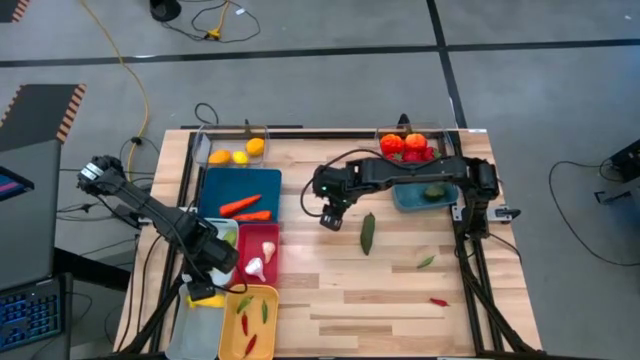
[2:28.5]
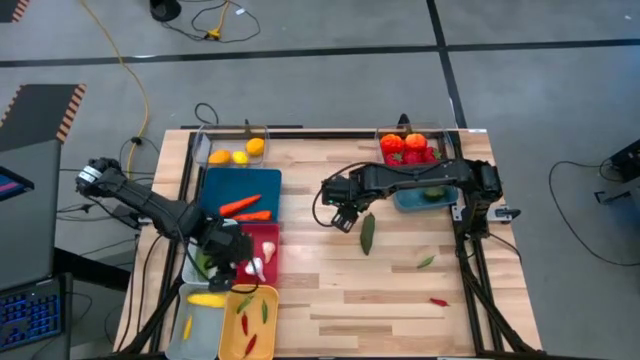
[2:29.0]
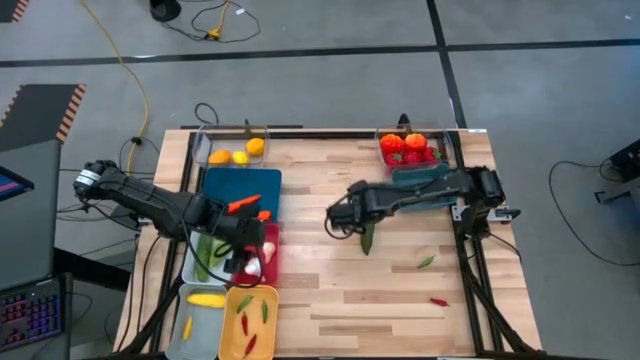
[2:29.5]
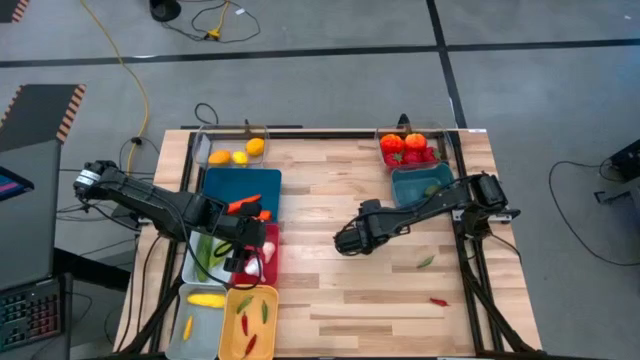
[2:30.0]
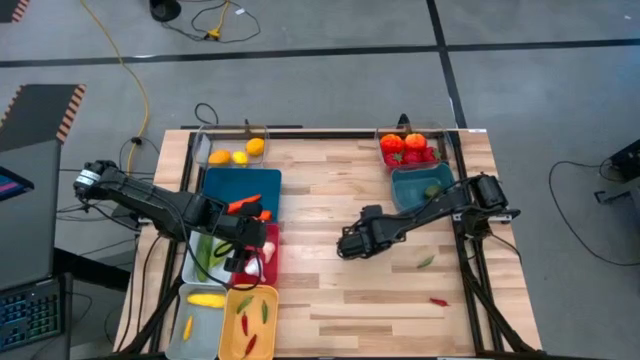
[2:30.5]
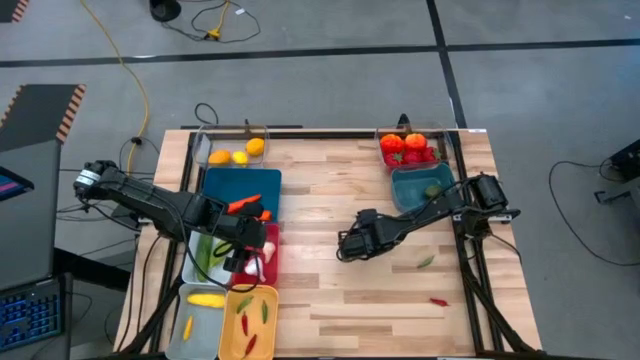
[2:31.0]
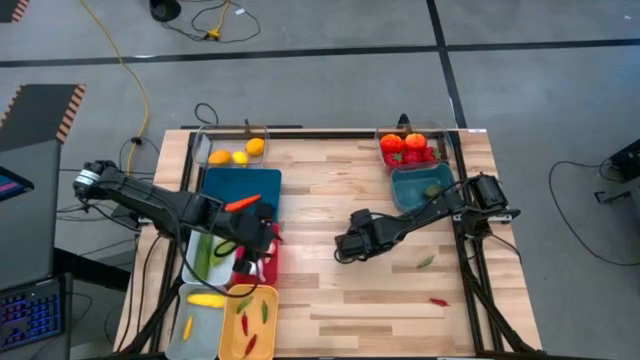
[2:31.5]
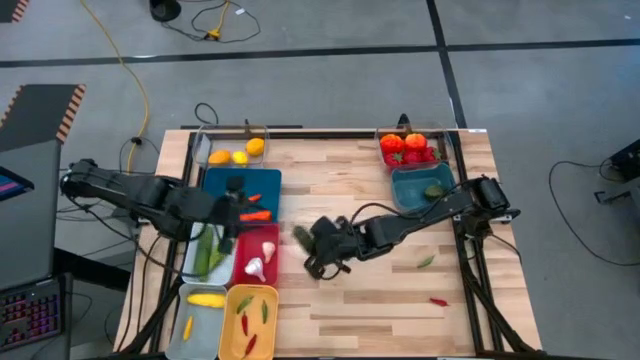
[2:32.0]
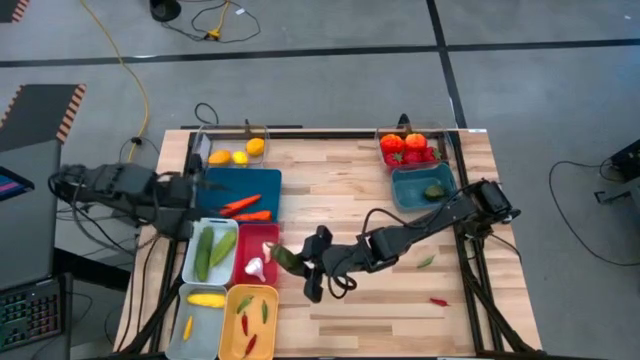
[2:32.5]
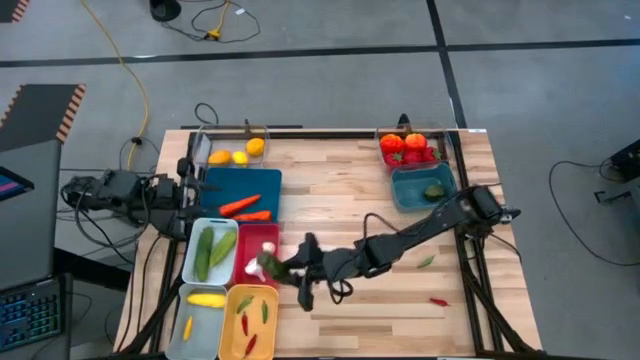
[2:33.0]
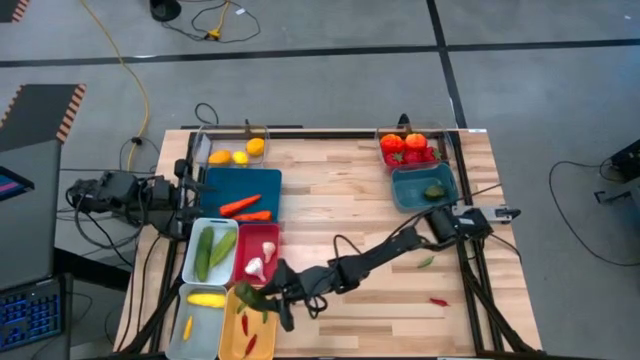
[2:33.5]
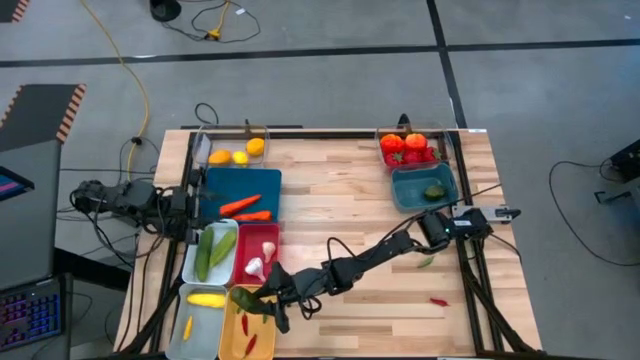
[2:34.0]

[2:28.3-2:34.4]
Task: Sort produce into baskets
Put the top green chili pepper into the yellow bin

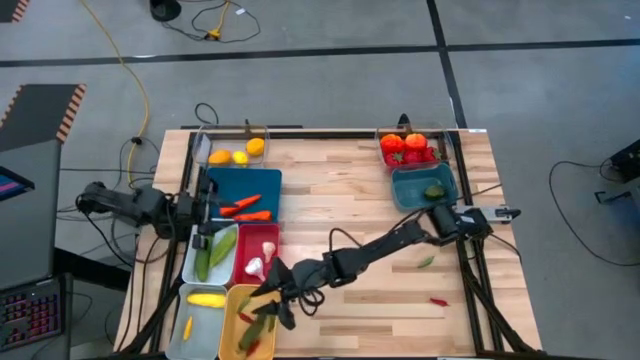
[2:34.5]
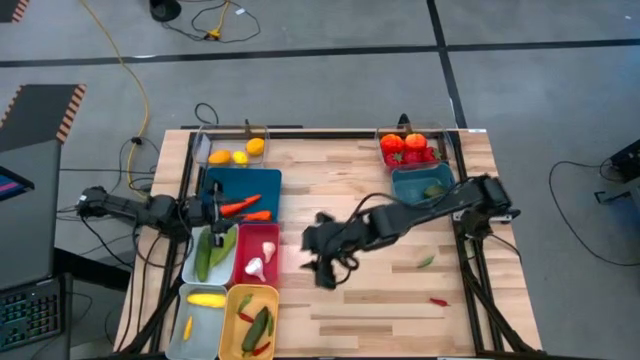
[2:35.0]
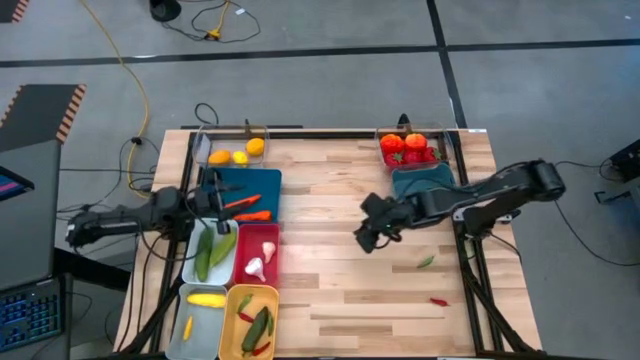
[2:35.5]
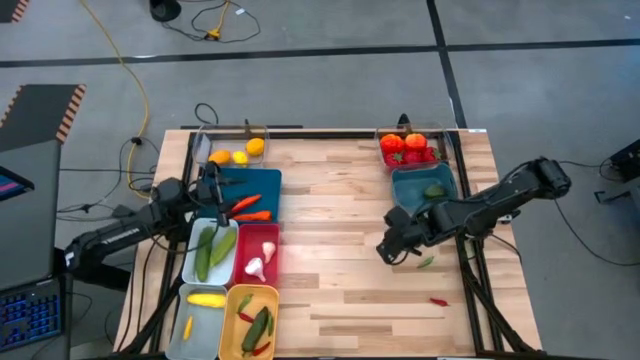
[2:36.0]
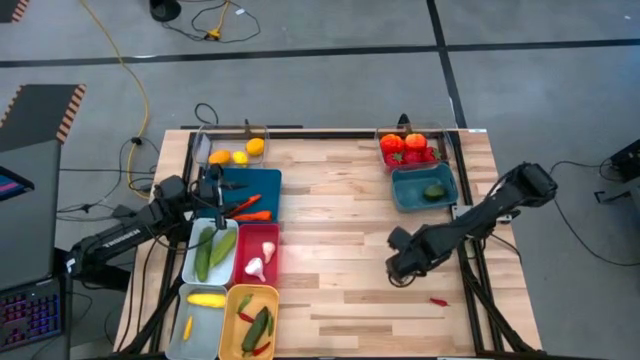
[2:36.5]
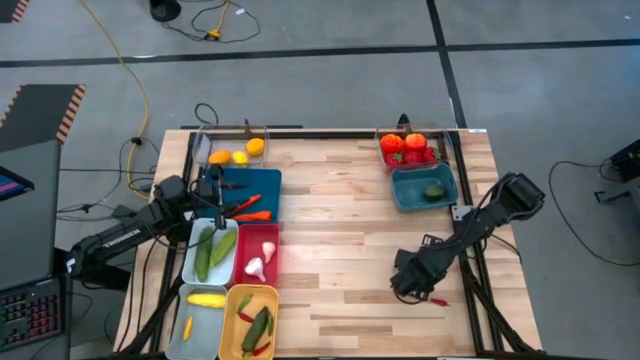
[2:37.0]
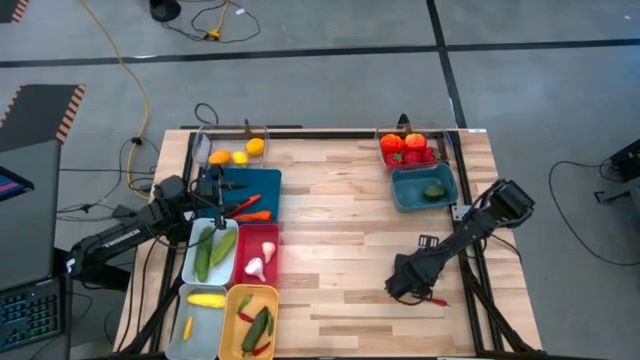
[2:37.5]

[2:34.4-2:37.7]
Put the green chili pepper into the yellow bin

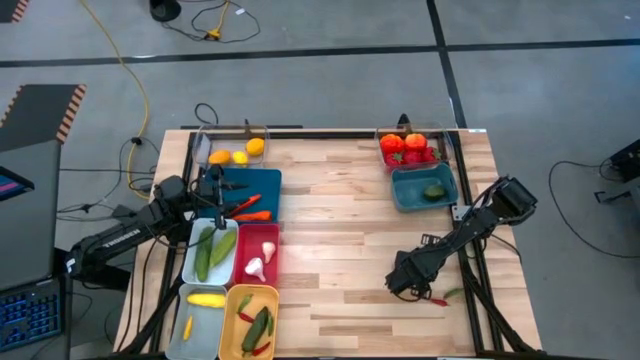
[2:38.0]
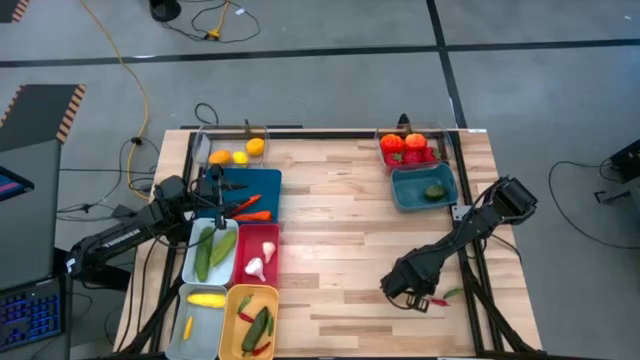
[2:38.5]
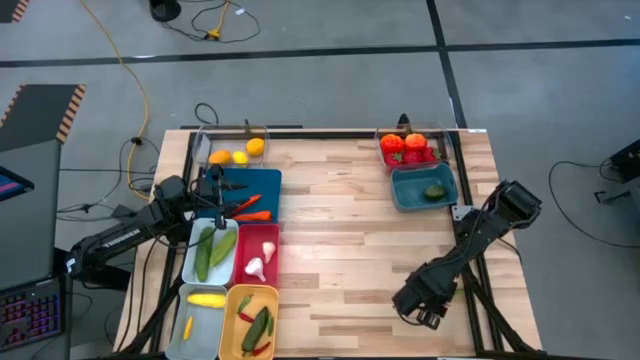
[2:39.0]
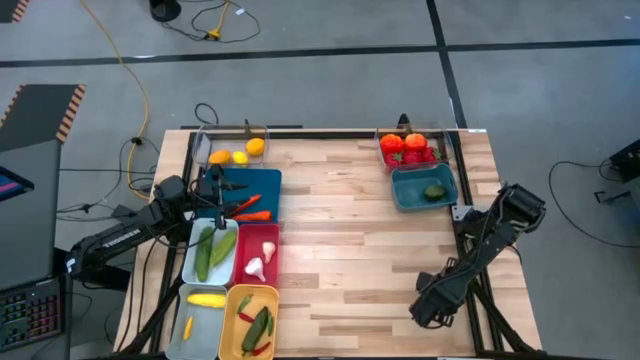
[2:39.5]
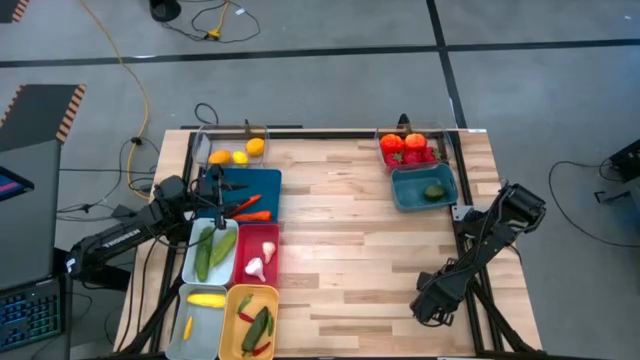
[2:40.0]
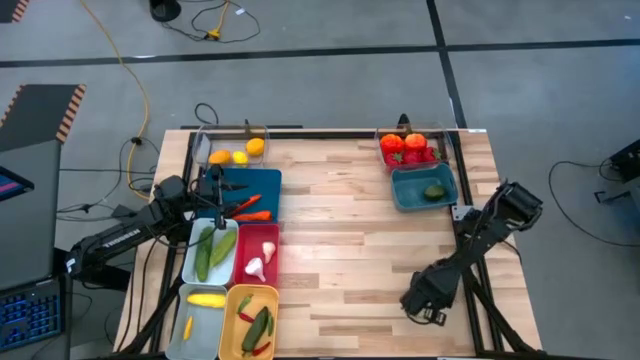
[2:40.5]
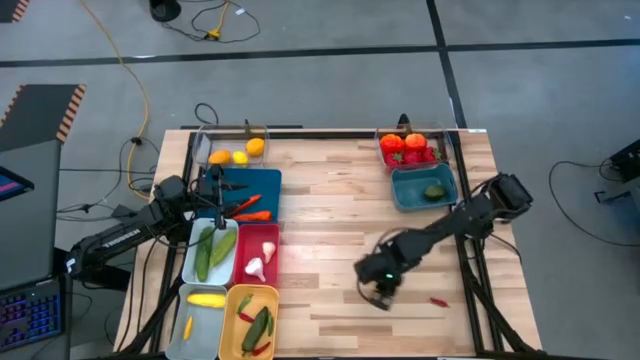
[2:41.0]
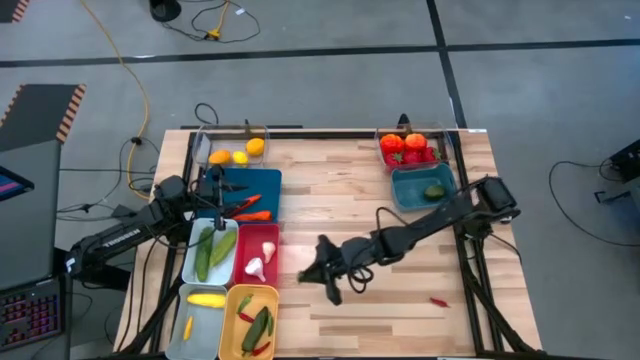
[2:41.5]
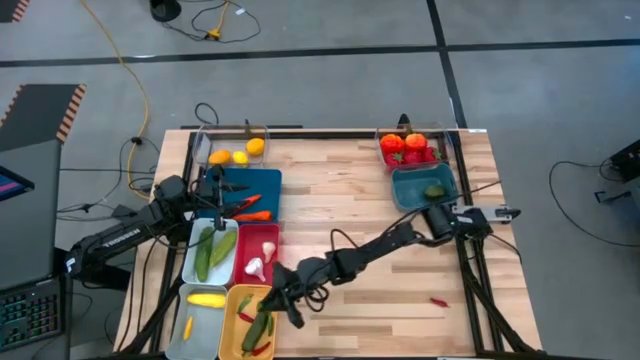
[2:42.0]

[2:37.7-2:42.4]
Put the green chili pepper into the yellow bin

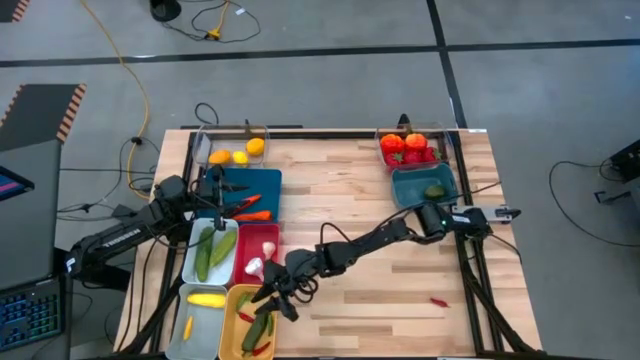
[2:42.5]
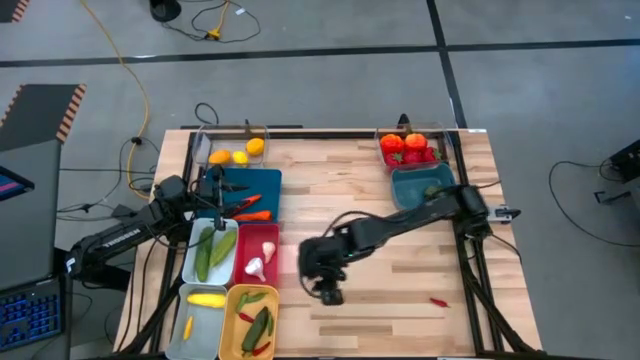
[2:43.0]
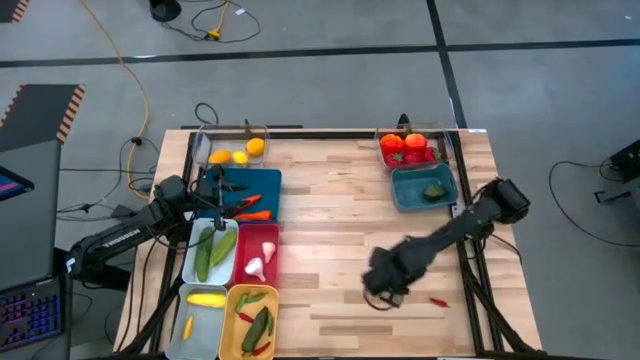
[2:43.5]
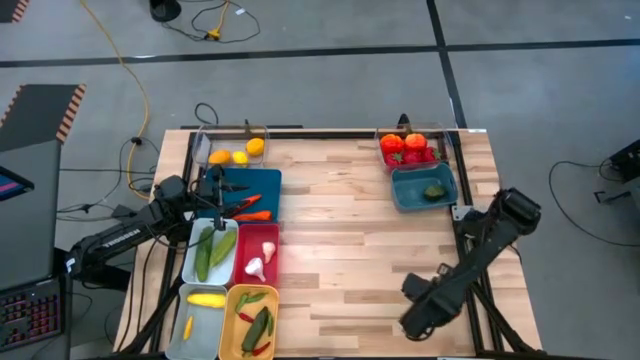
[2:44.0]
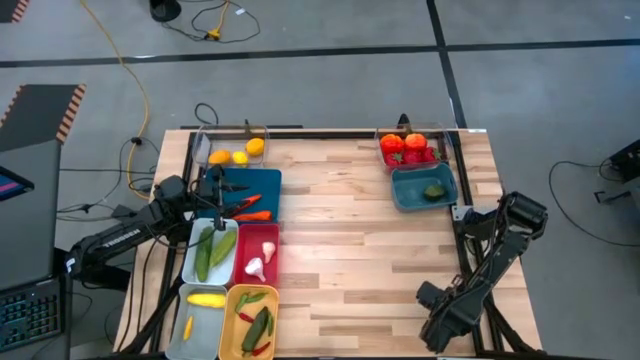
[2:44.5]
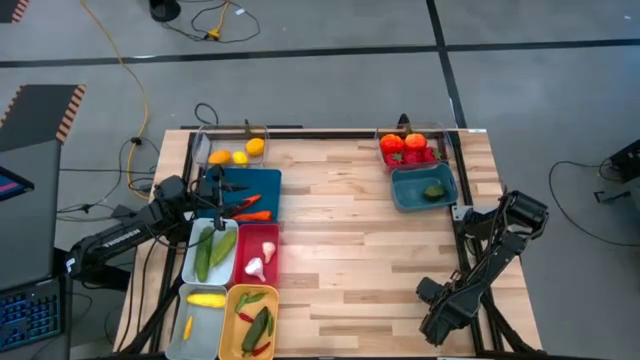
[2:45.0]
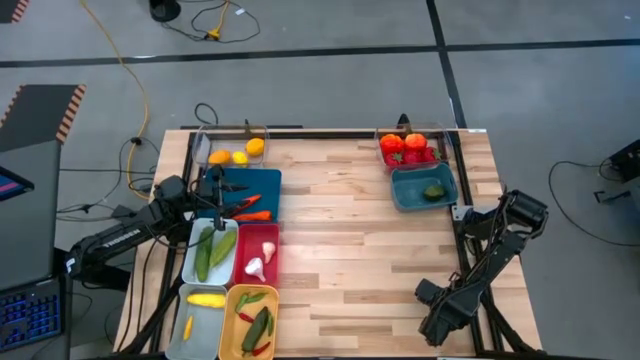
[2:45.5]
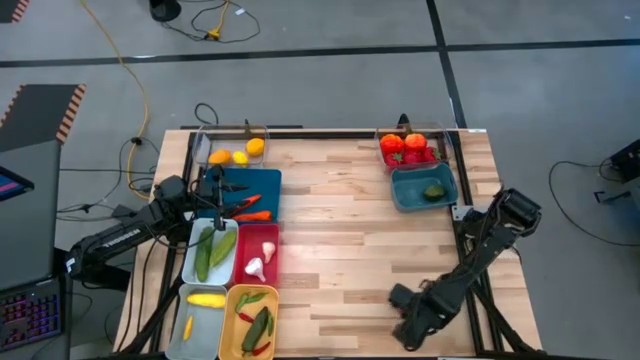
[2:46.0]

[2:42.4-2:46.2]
Put the red chili pepper into the yellow bin

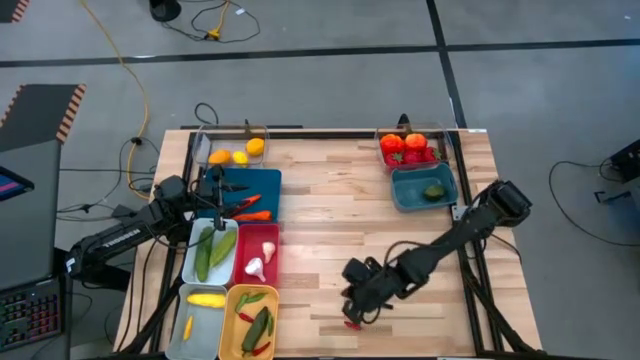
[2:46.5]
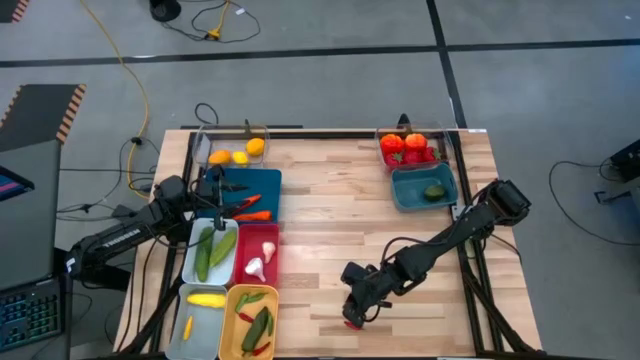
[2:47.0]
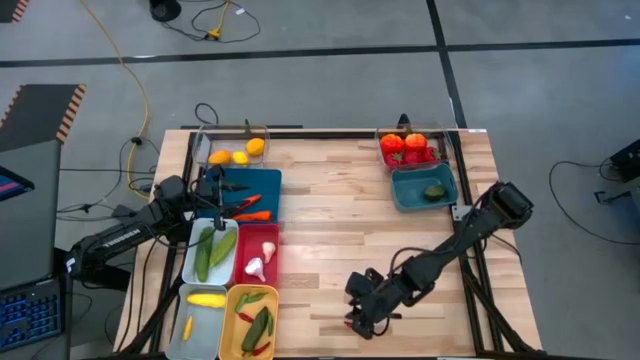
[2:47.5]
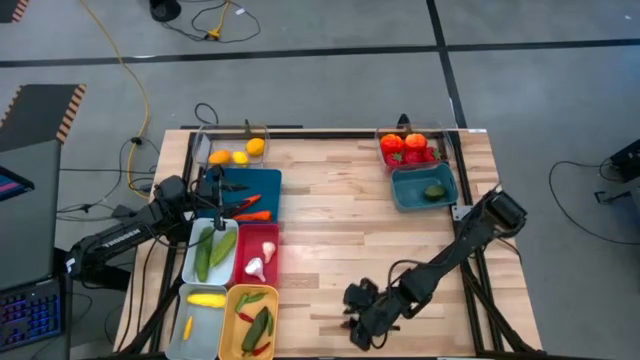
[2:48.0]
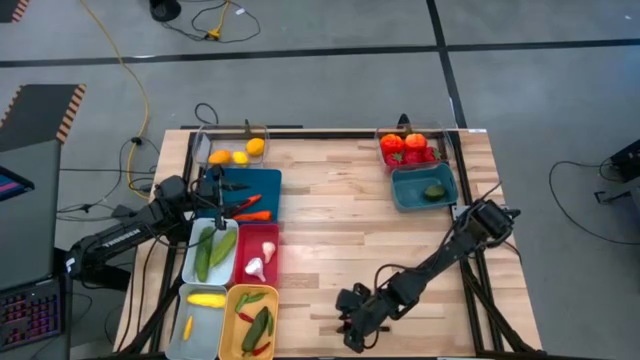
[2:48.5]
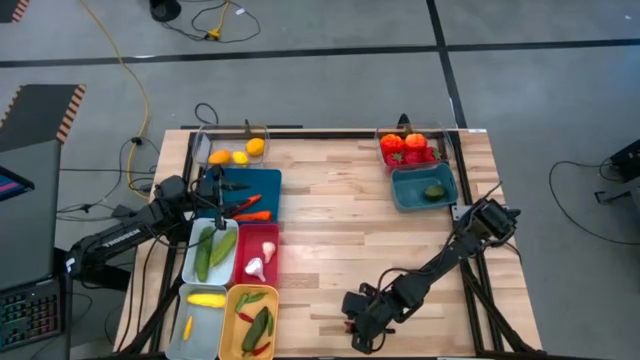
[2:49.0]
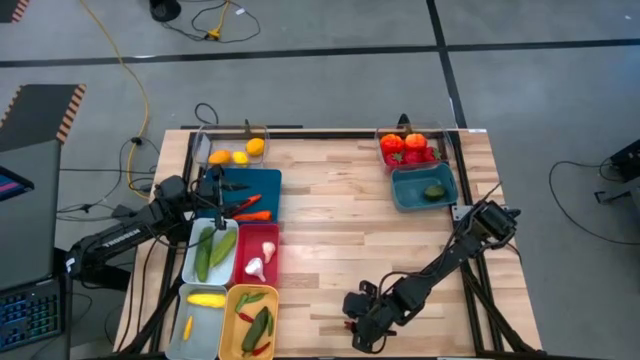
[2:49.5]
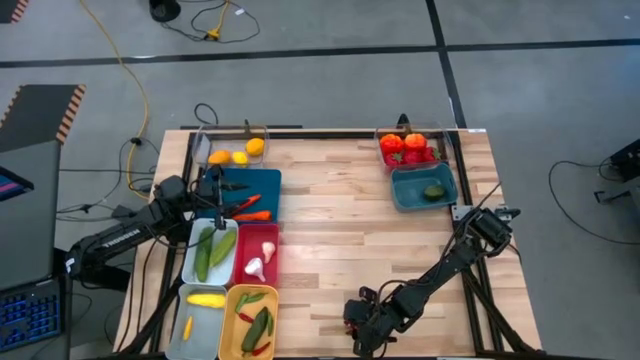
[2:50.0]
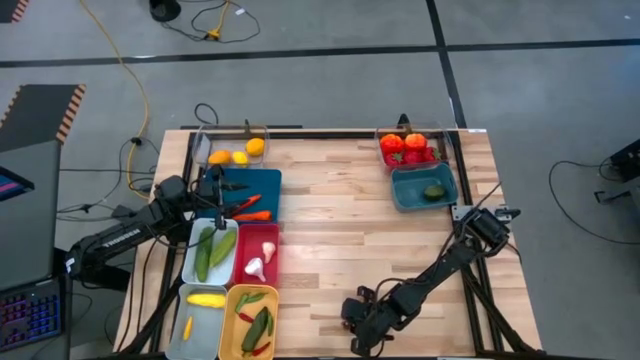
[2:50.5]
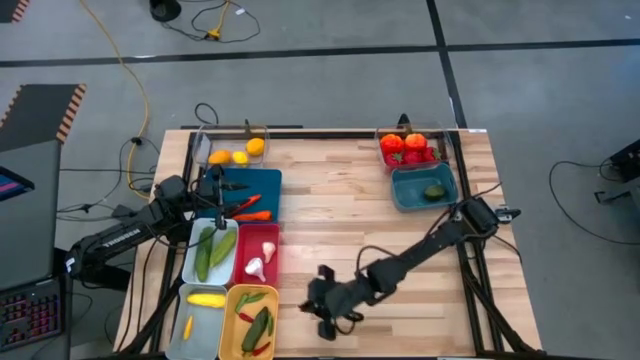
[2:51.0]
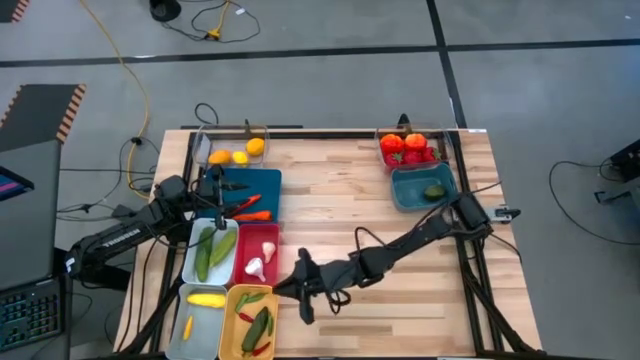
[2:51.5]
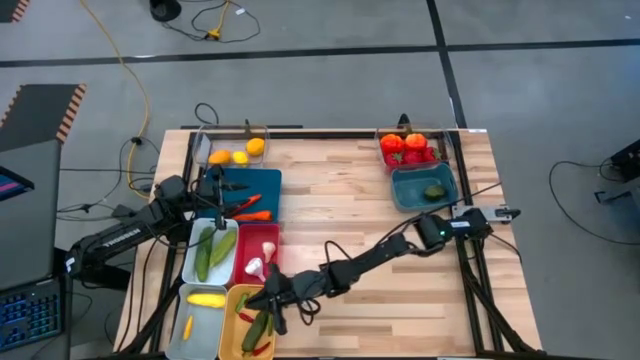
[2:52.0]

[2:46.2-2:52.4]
Put the red chili pepper into the yellow bin
